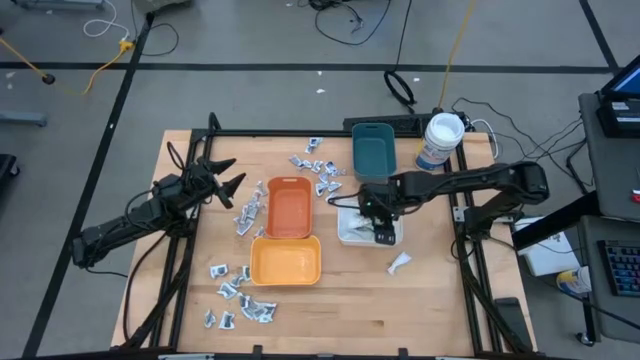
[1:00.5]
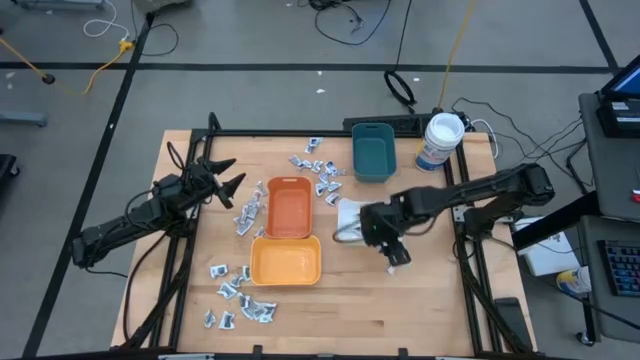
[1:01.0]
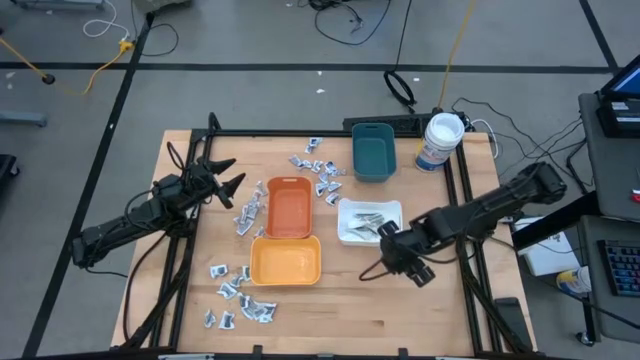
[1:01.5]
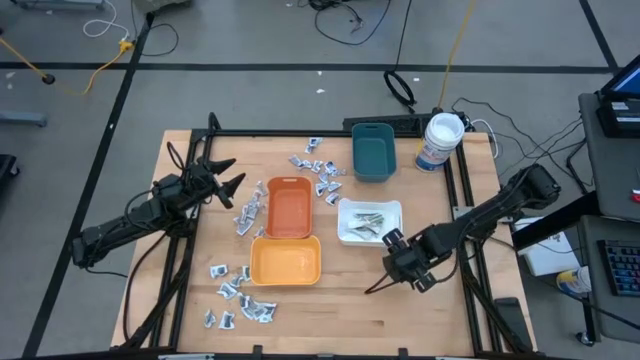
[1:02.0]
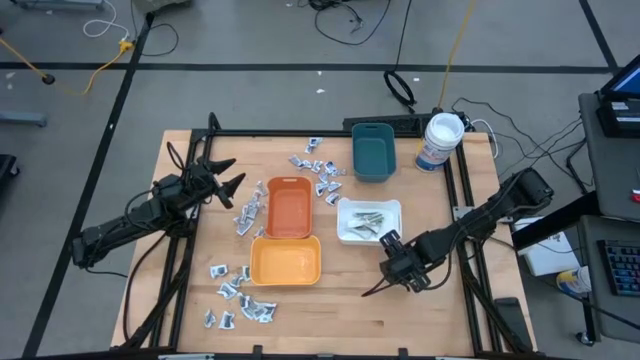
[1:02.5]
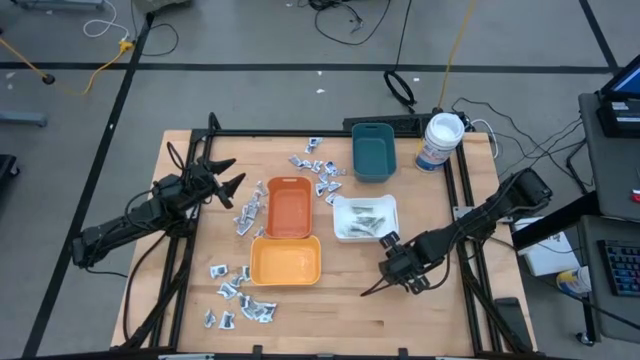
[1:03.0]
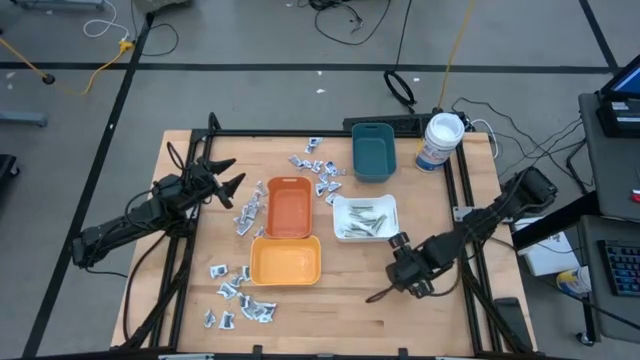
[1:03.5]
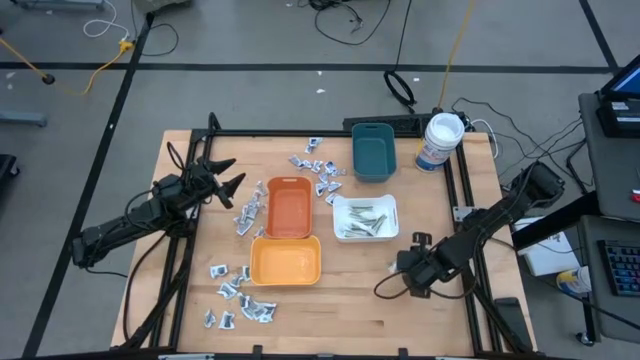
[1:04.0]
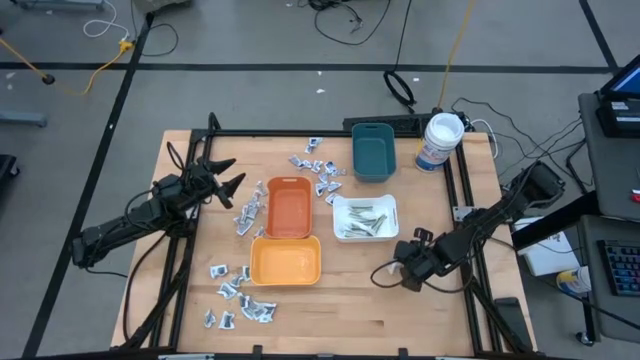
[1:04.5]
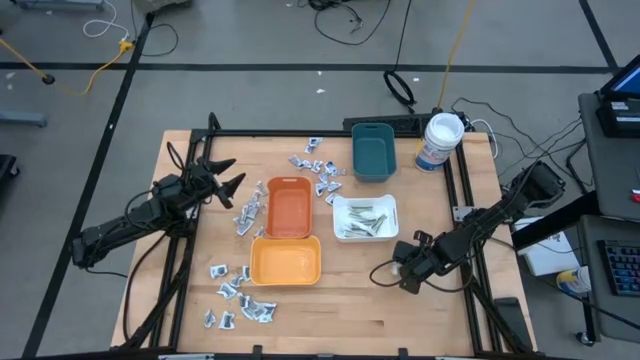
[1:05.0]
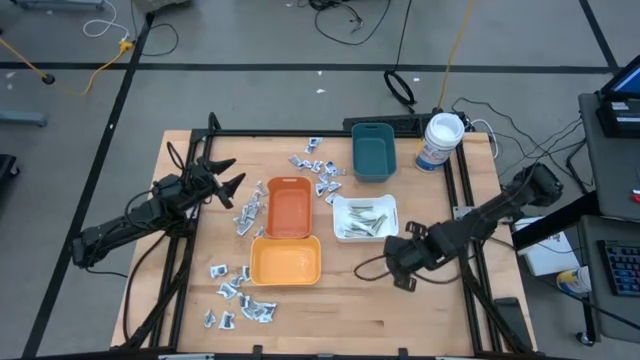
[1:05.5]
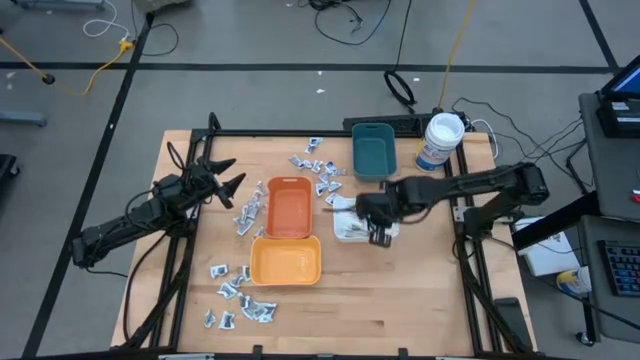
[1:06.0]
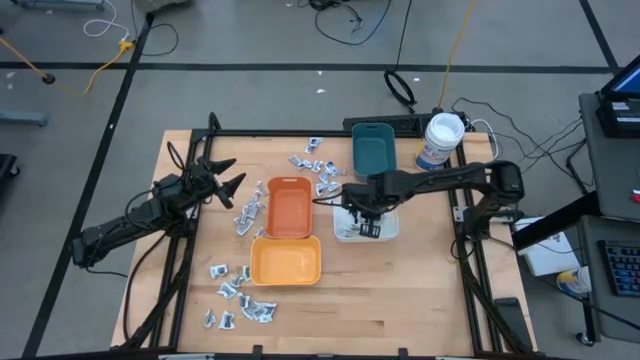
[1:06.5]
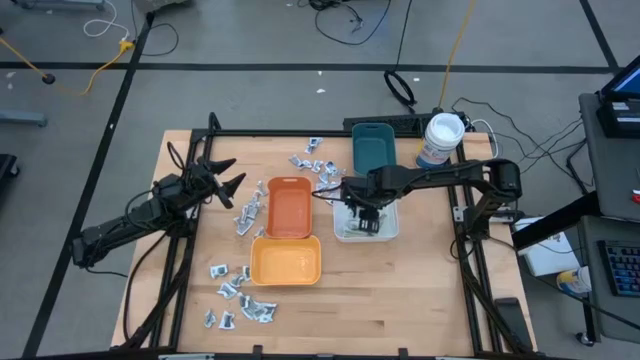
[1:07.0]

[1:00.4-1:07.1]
Task: Pick & Place First Aid Supplies
Put the green sachet into the white bin

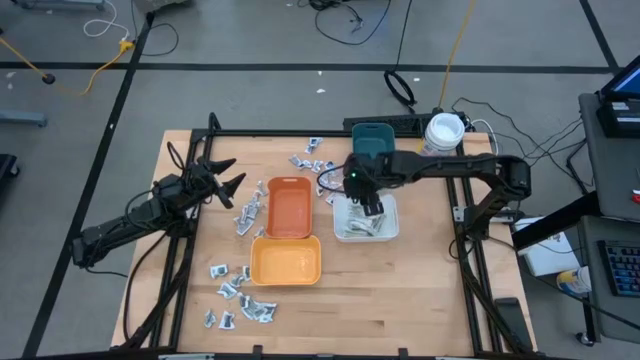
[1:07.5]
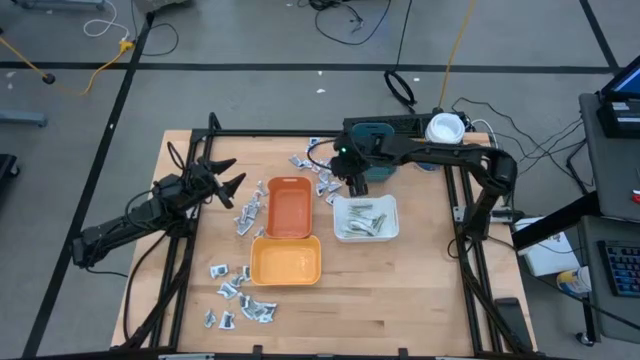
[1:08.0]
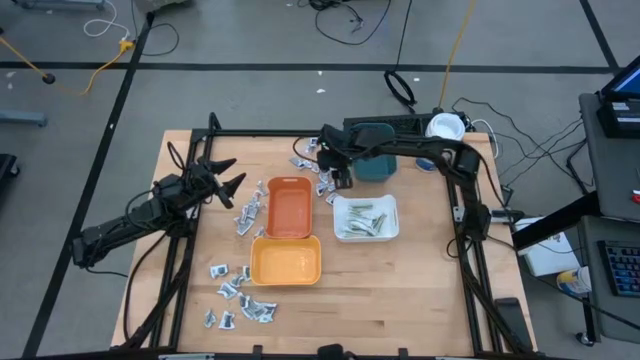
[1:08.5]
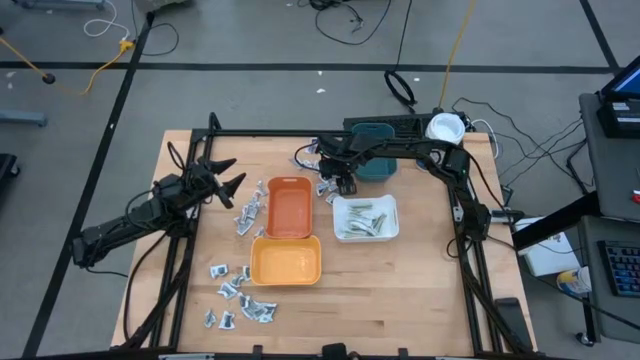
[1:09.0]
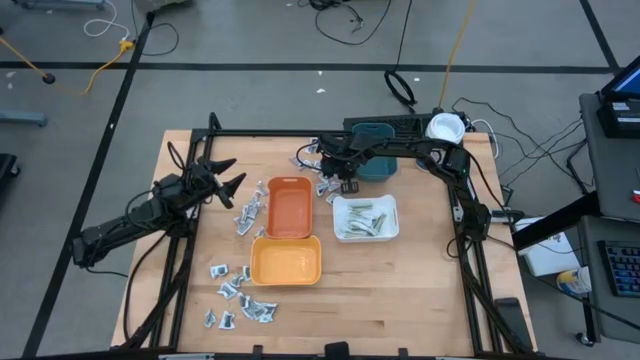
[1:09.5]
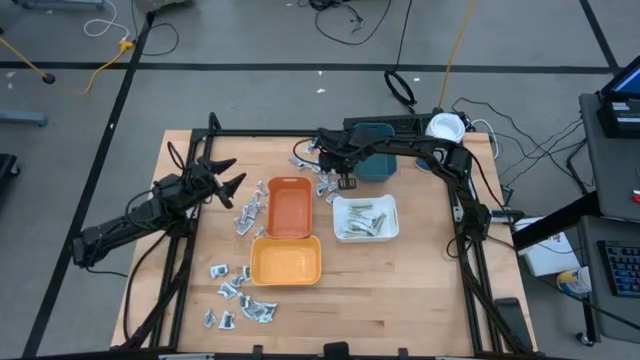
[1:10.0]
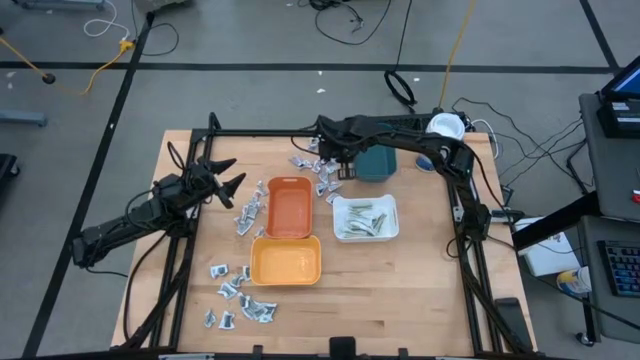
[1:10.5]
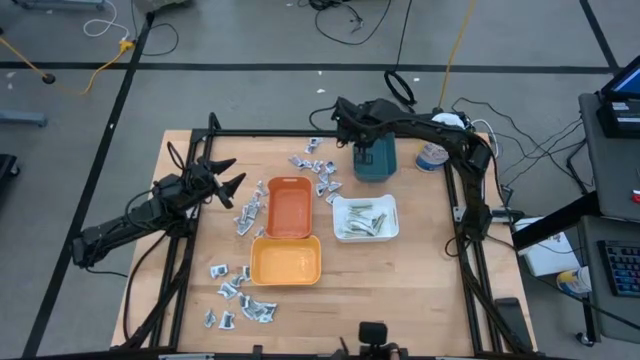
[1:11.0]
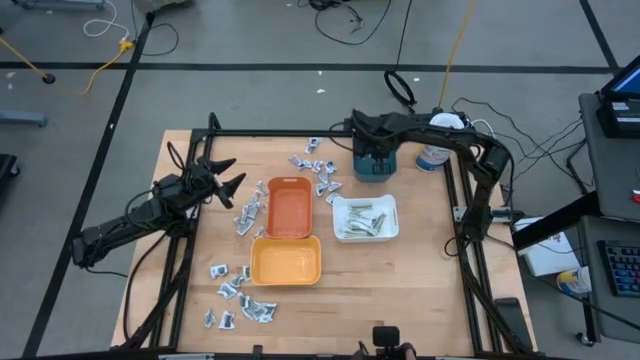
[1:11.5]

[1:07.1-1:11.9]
Put the blue sachet into the blue bin

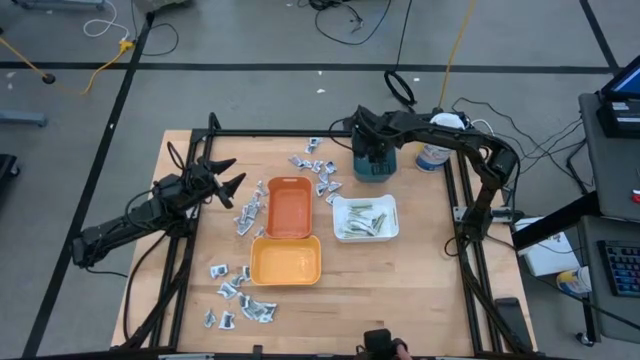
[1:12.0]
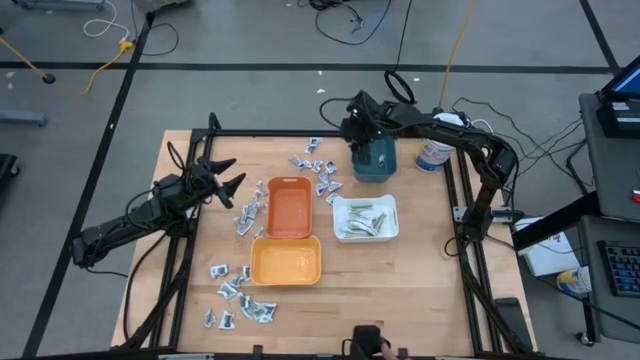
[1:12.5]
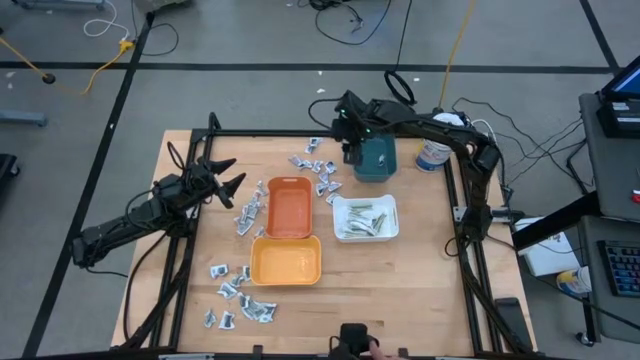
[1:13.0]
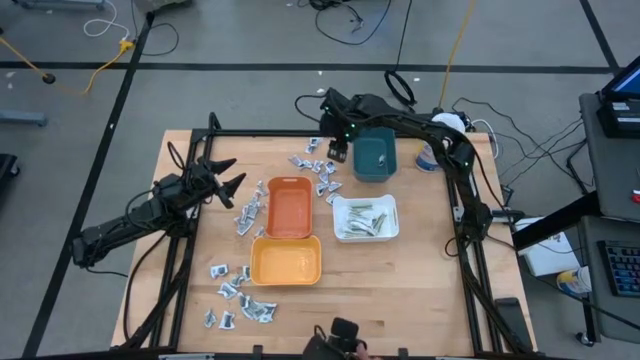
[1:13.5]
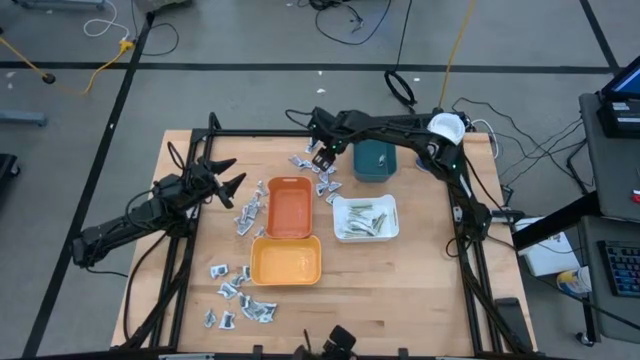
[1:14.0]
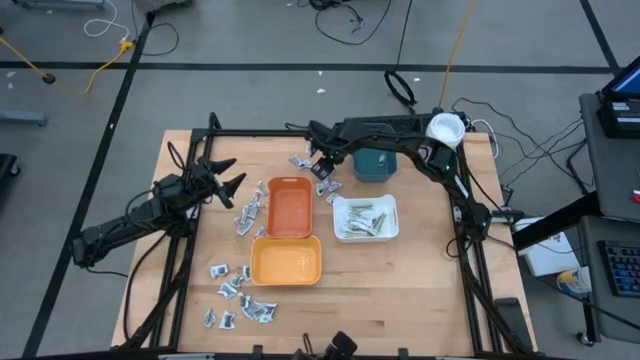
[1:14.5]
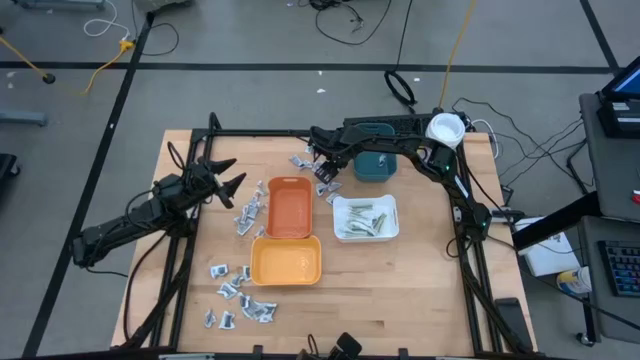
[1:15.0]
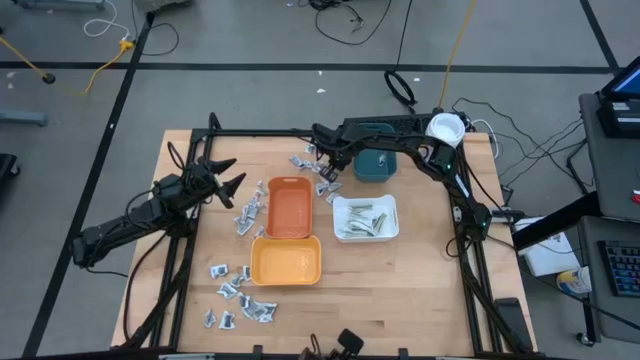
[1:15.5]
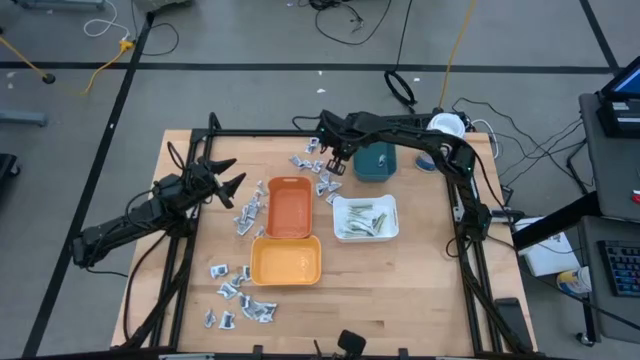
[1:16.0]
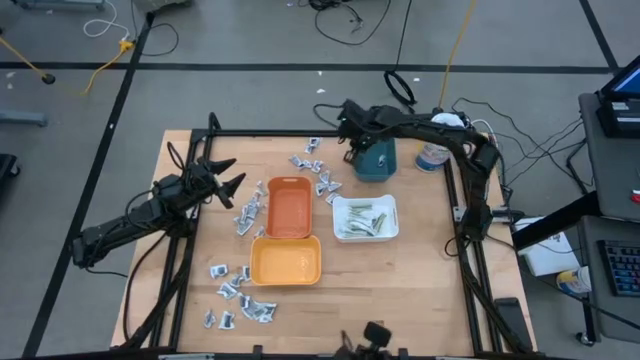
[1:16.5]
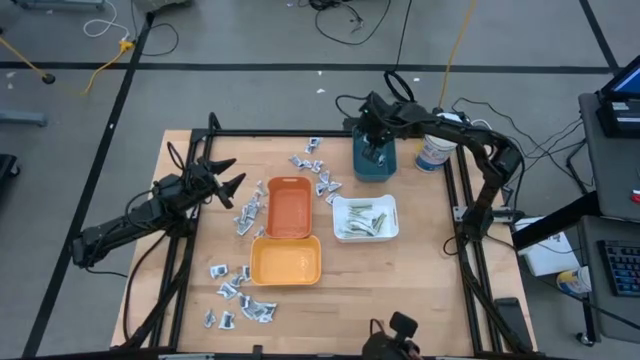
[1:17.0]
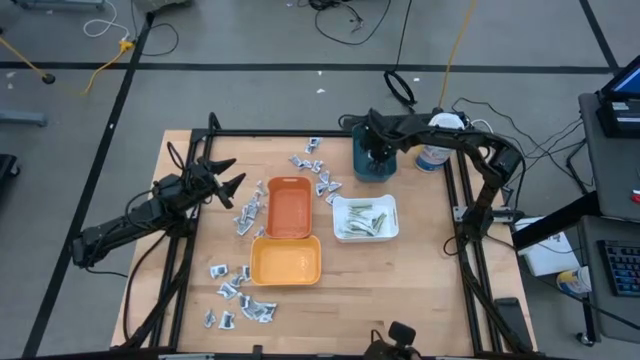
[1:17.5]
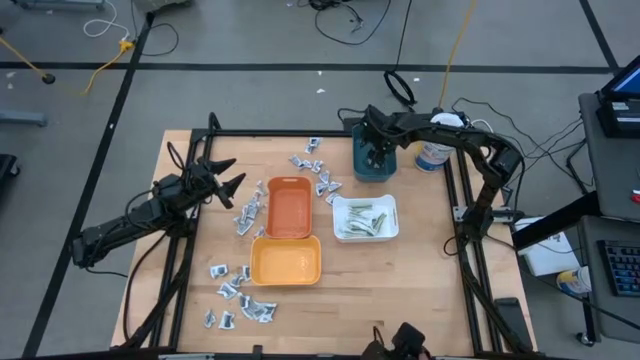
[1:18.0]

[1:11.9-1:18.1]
Put the blue sachet into the blue bin

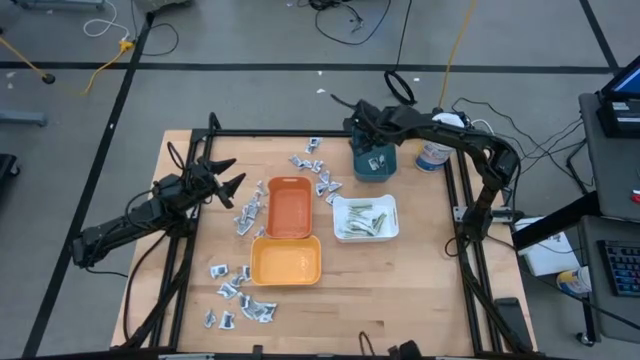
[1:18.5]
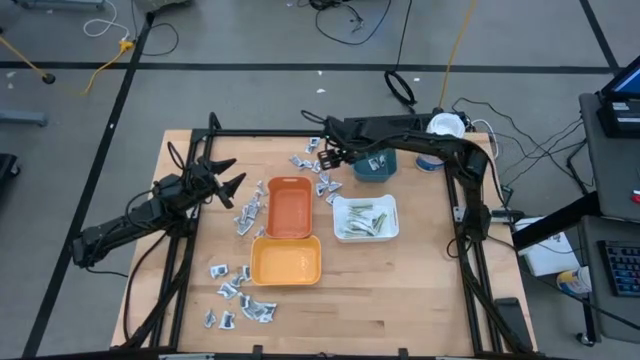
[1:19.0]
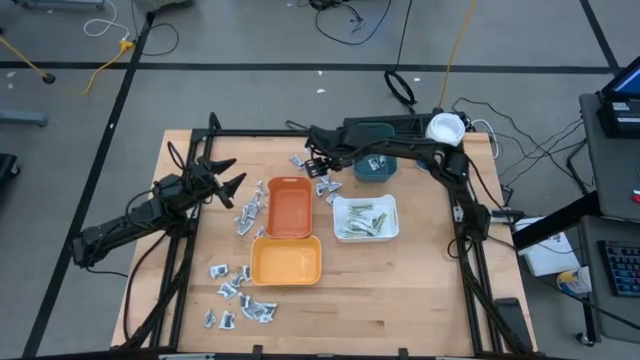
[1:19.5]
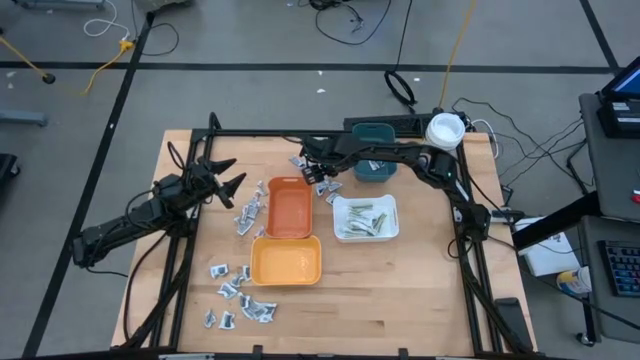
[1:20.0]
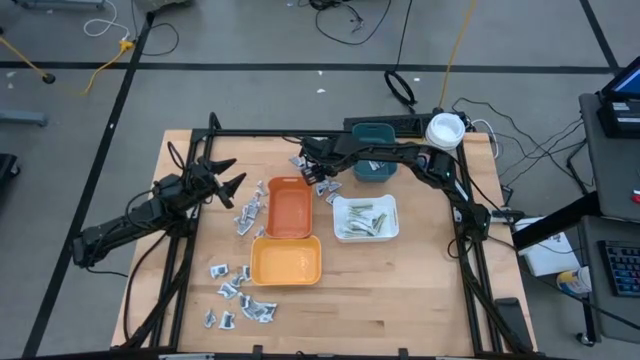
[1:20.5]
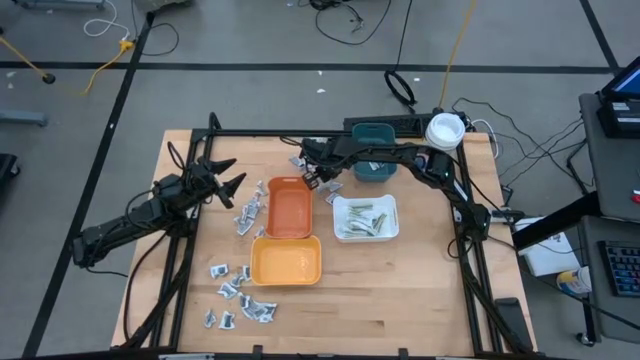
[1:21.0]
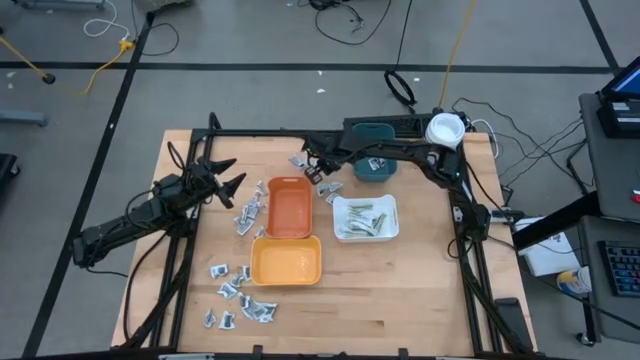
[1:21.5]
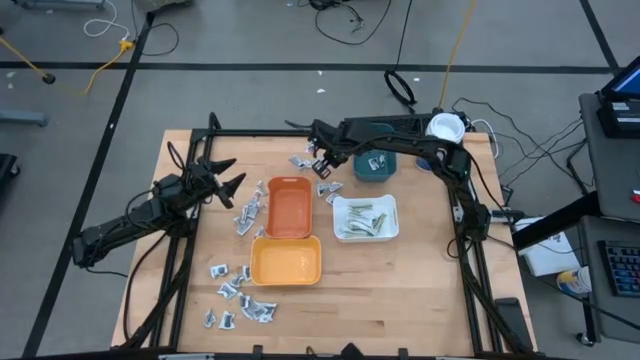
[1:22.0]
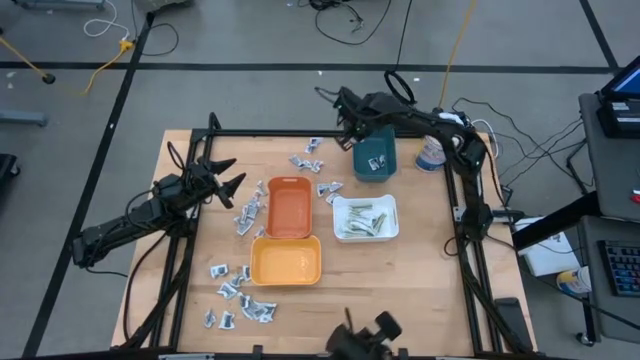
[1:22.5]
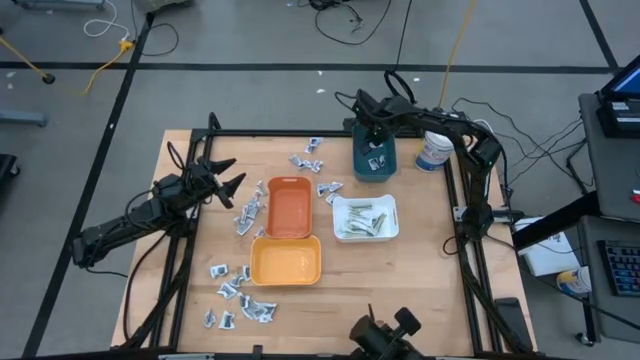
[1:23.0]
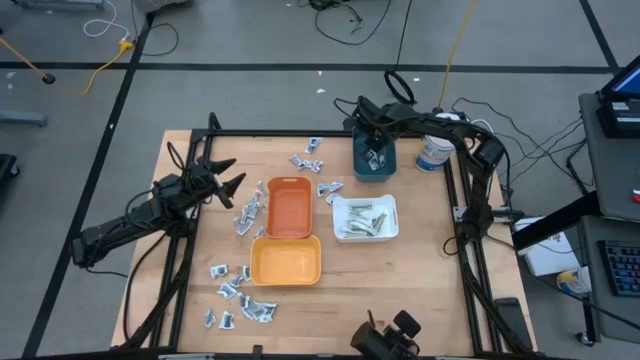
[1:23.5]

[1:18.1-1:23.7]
Put the blue sachet into the blue bin
